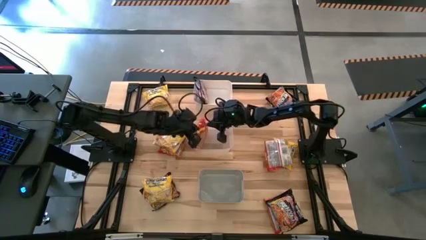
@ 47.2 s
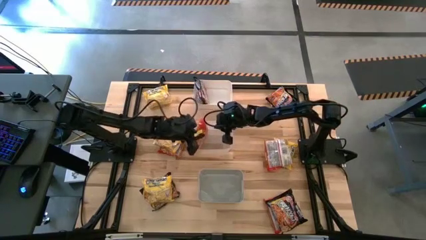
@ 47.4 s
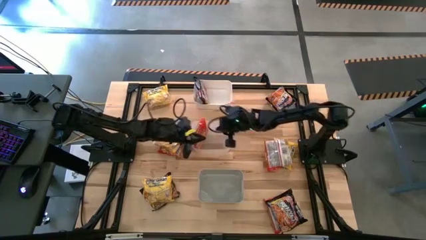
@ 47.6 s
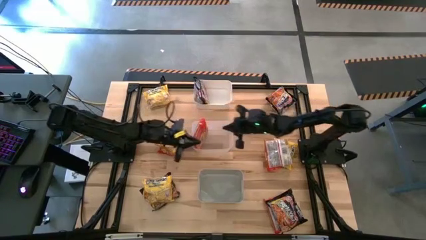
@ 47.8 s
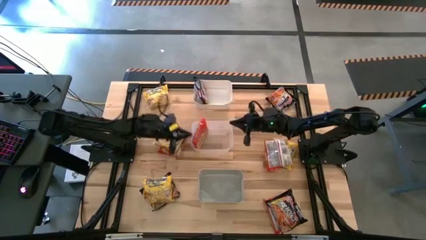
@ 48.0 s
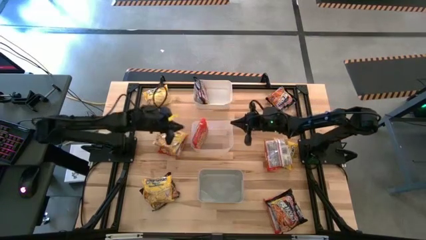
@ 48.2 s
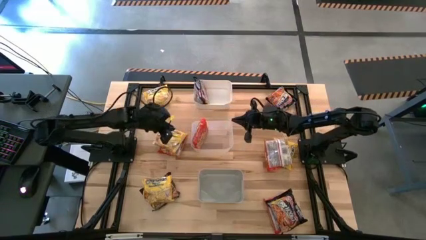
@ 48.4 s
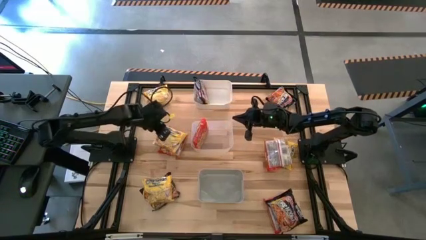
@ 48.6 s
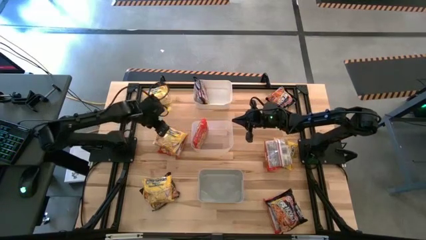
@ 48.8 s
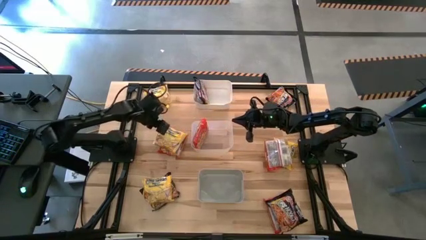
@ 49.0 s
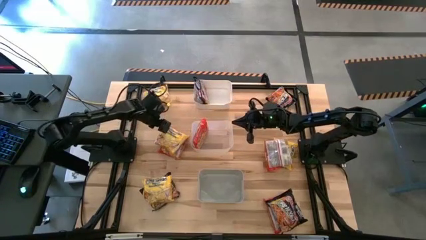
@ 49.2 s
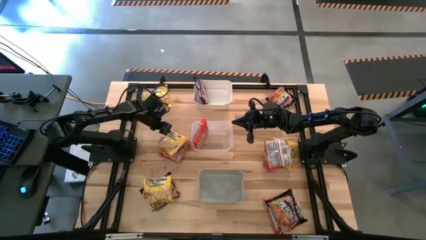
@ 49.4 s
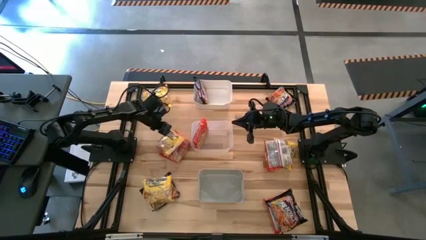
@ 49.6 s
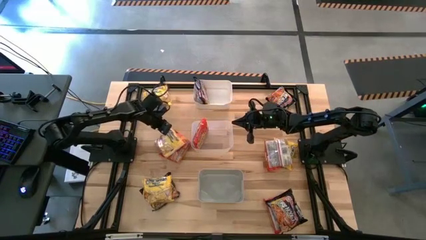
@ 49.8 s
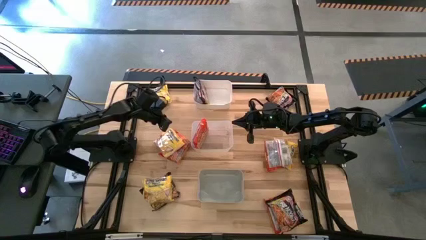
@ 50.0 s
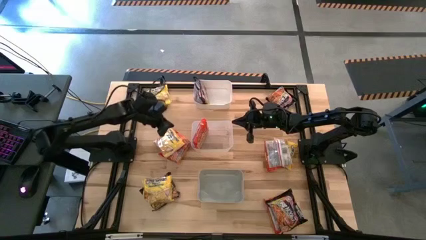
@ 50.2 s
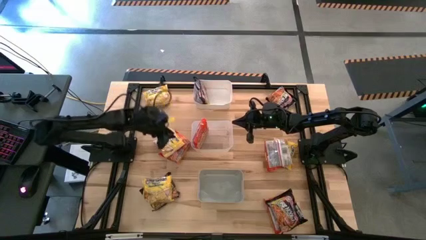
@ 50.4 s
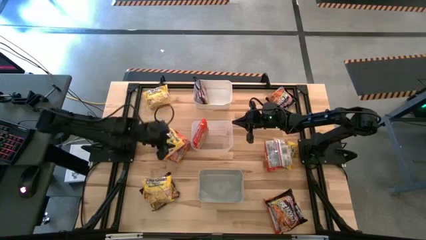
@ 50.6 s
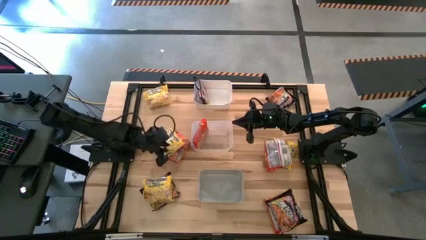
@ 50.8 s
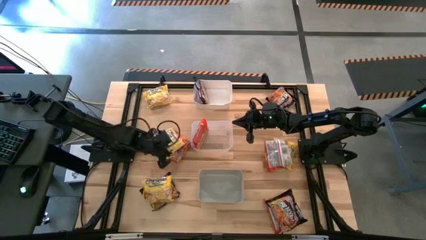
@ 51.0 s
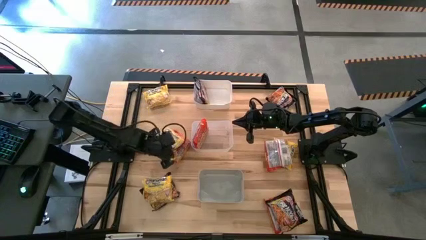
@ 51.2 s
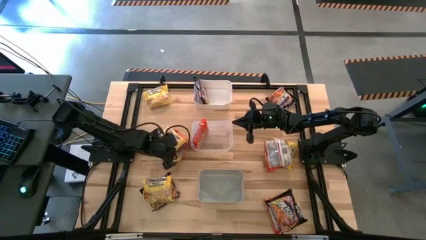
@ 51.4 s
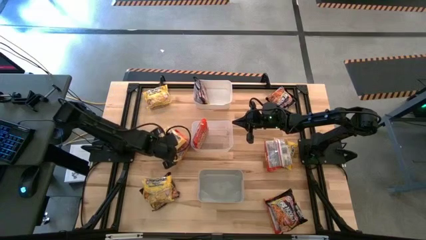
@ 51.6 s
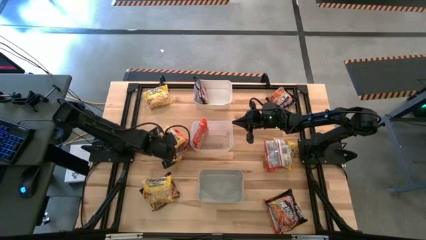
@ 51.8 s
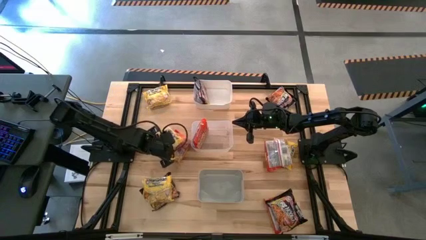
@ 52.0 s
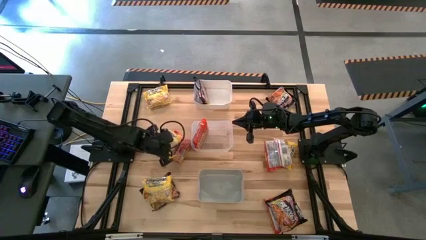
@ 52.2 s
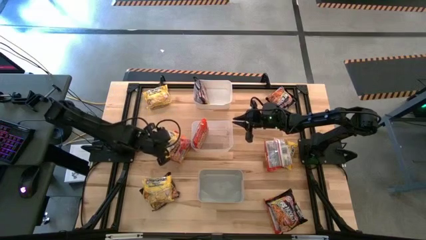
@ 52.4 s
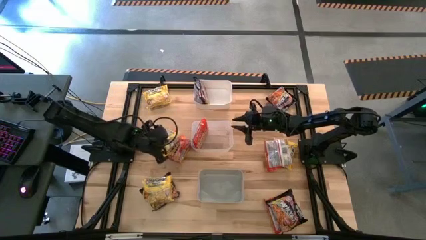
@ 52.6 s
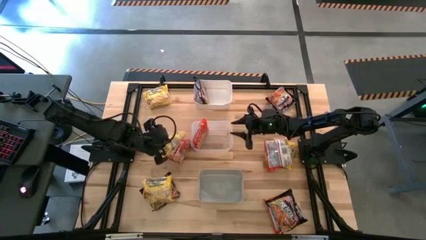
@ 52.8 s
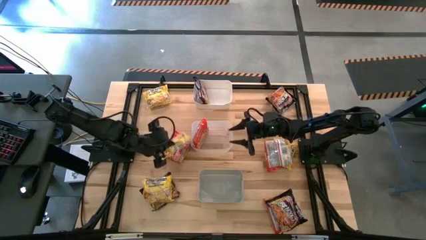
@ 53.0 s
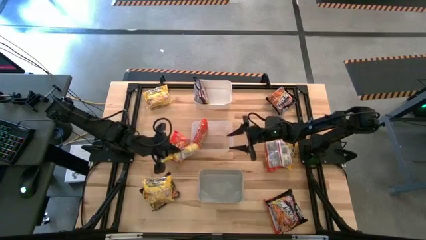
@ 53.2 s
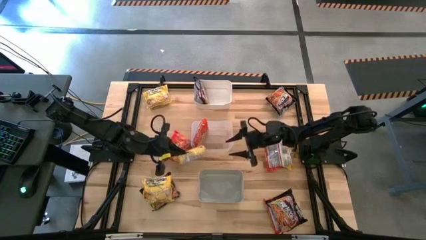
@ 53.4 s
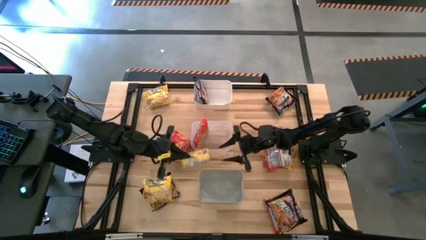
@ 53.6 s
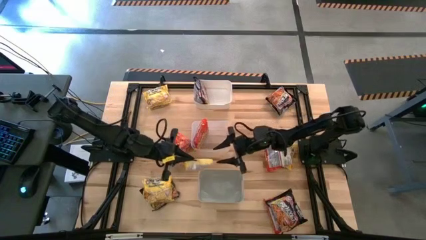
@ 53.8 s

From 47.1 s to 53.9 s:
Task: Sort Maruchan noodles
Put the yellow noodle pack into the gray bin

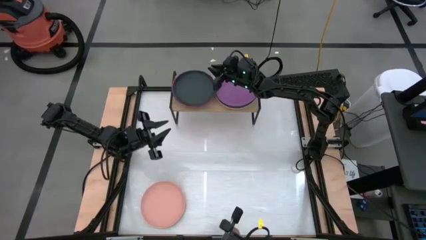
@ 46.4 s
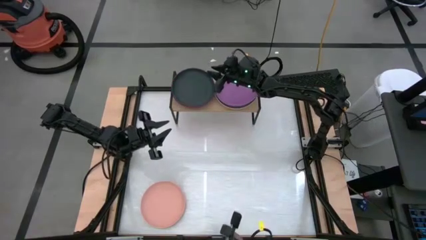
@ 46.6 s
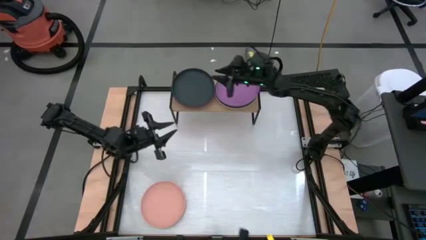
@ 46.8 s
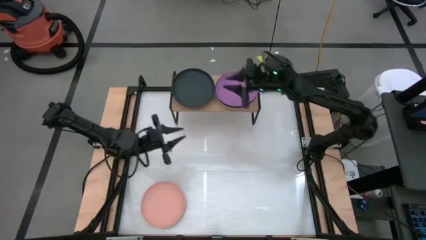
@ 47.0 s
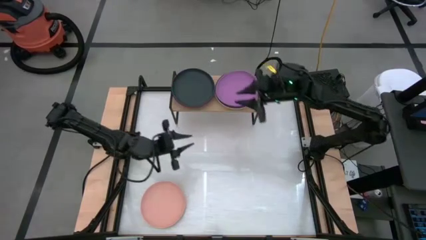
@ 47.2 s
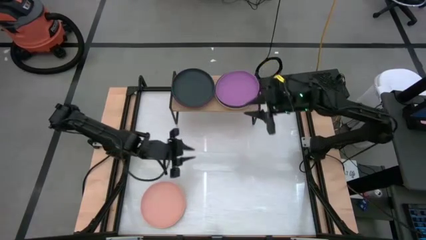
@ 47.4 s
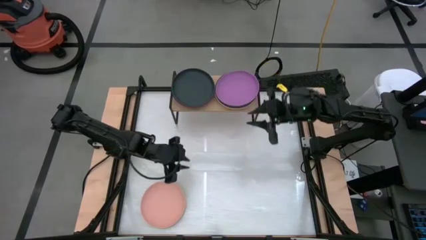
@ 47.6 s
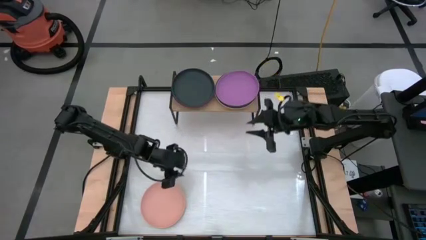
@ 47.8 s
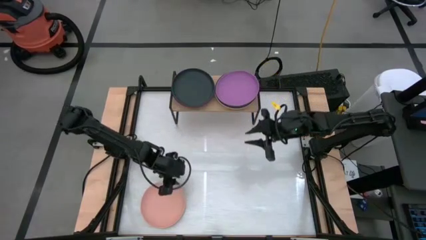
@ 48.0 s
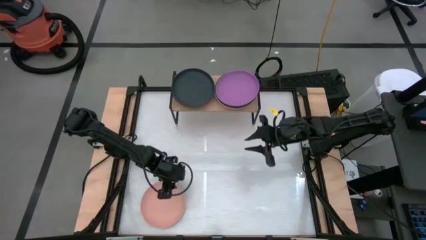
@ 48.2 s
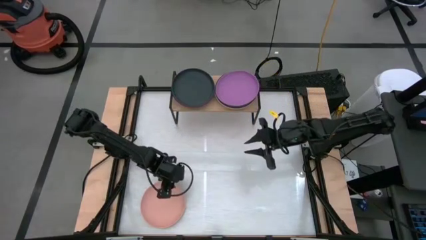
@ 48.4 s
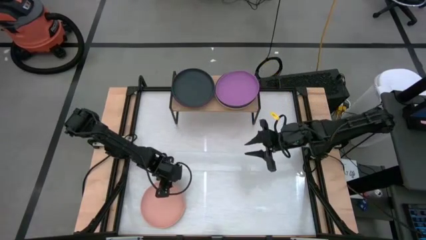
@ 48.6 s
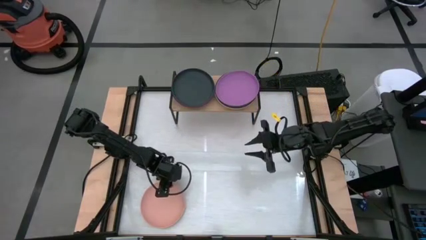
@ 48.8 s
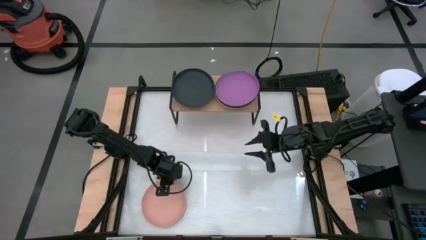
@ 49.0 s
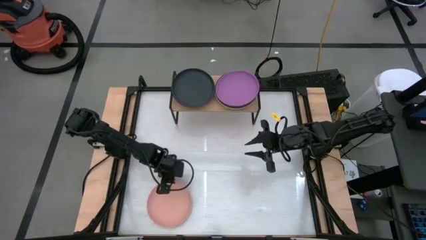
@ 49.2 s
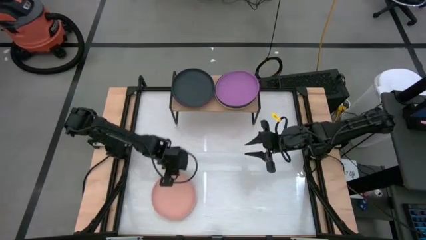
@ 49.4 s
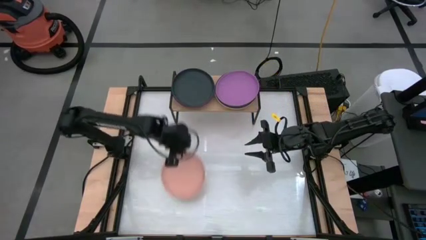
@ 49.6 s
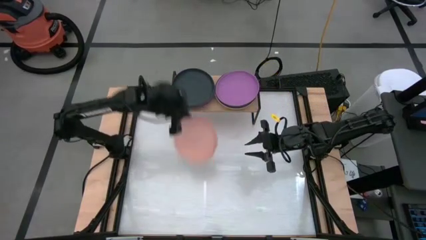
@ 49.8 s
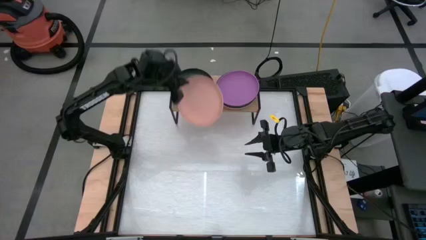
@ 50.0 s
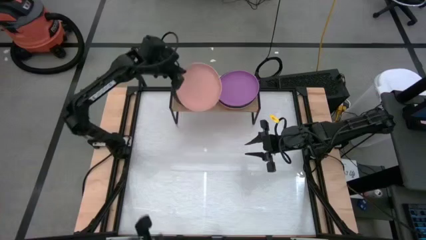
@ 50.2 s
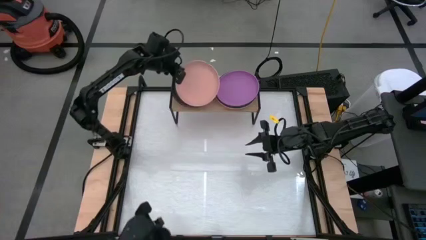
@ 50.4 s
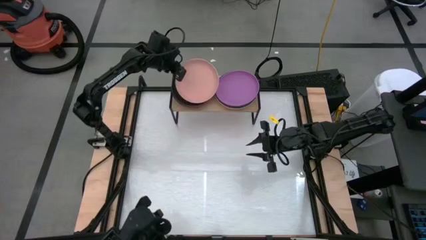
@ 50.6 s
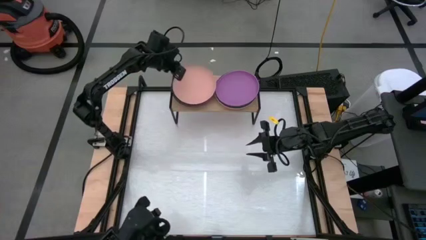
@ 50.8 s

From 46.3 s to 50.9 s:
Task: Place and stack plates onto a shelf
Stack the light orange plate on top of the black plate on the shelf

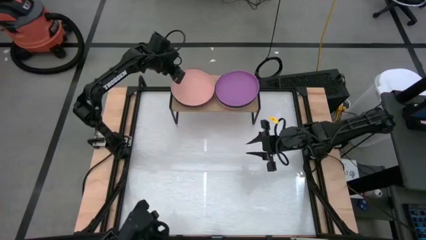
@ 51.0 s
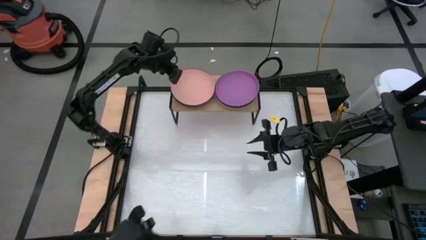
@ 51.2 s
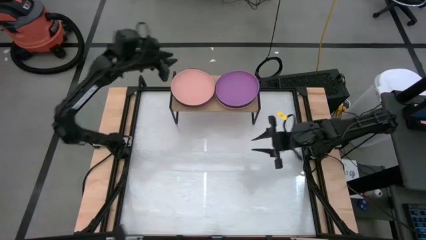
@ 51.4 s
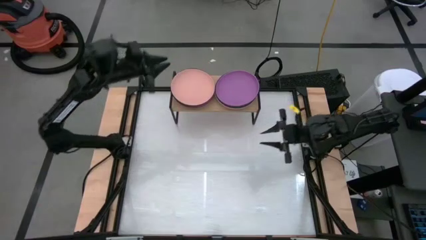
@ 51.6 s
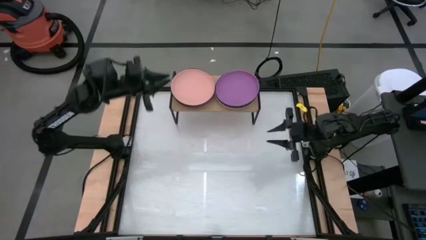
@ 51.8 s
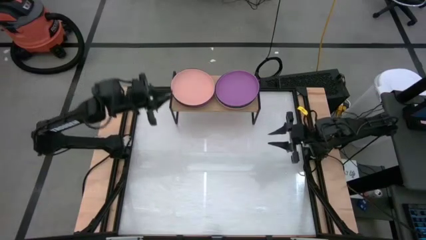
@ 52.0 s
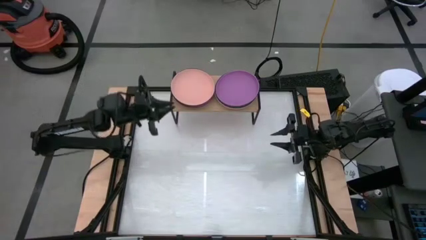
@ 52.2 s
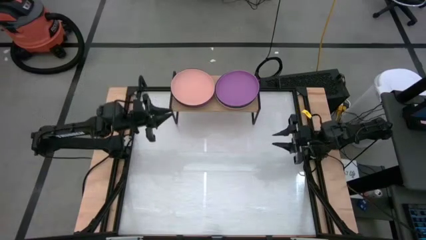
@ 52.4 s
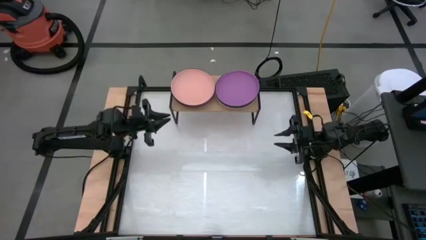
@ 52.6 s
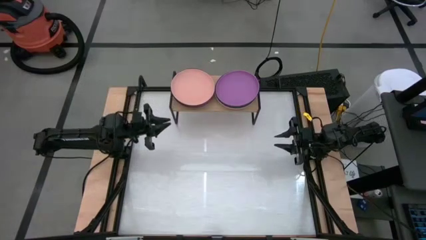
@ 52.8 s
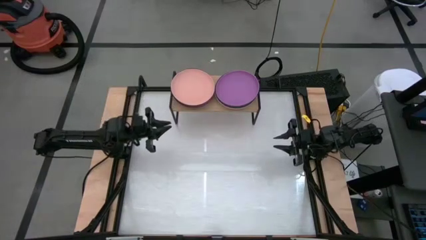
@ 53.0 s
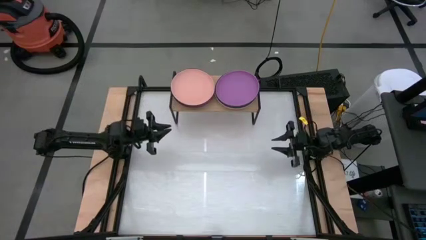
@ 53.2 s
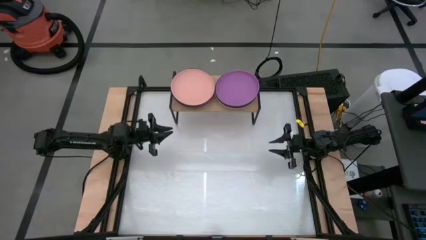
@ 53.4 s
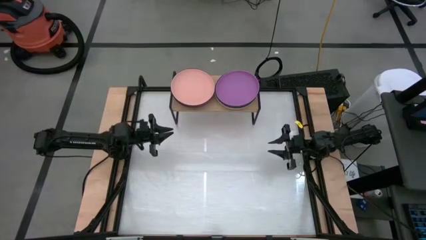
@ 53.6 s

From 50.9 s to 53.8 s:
Return to Home Position
